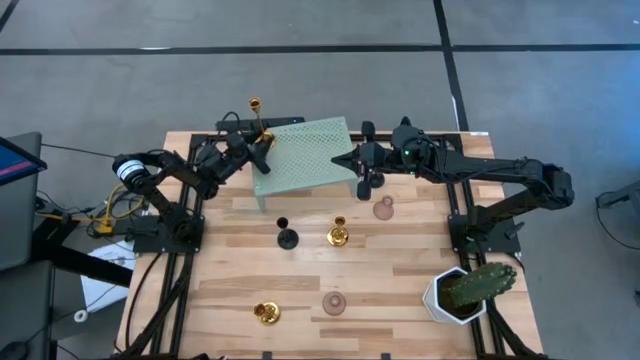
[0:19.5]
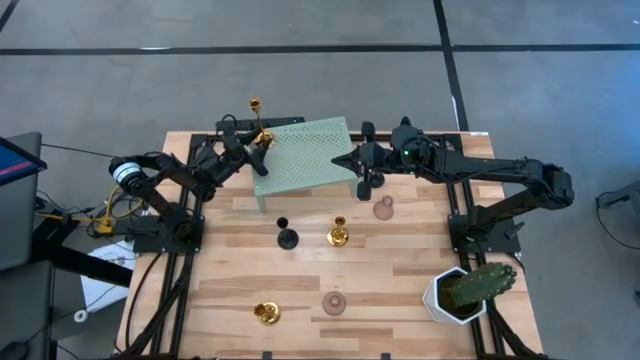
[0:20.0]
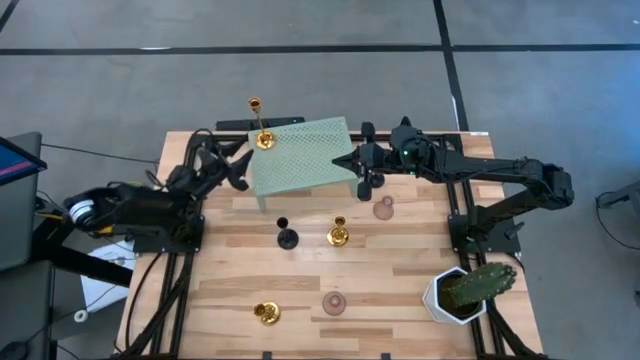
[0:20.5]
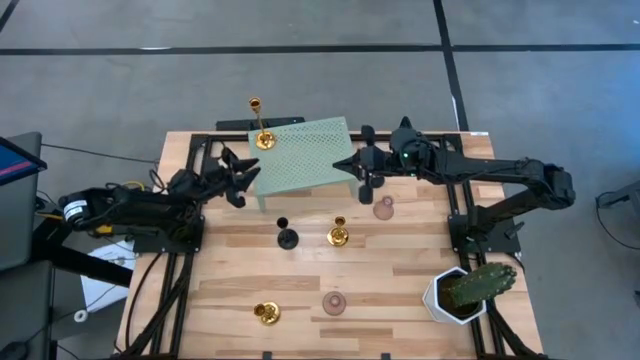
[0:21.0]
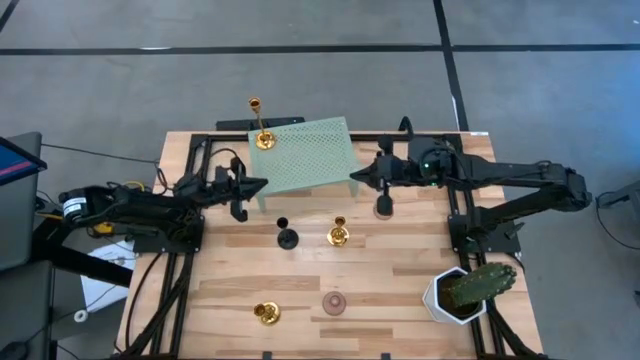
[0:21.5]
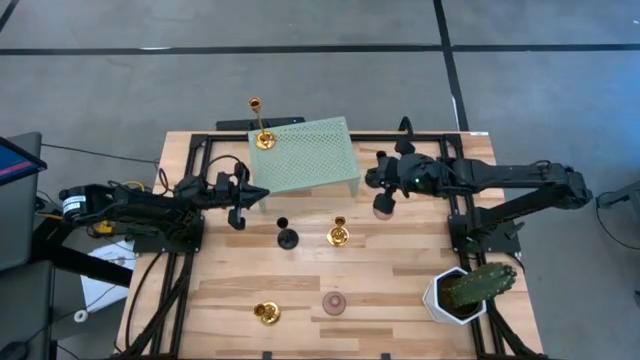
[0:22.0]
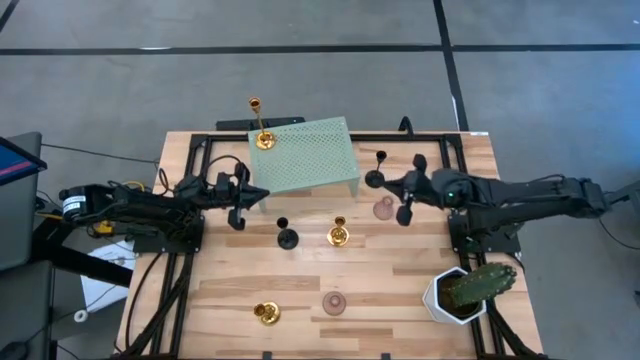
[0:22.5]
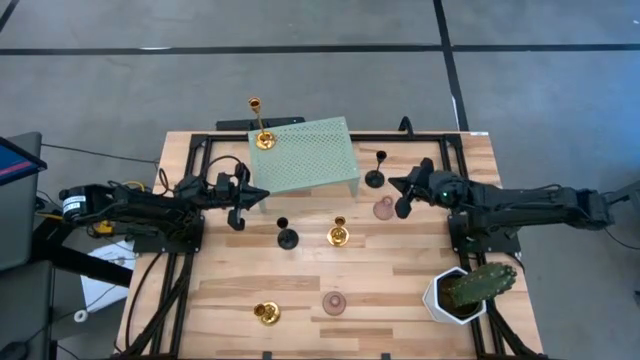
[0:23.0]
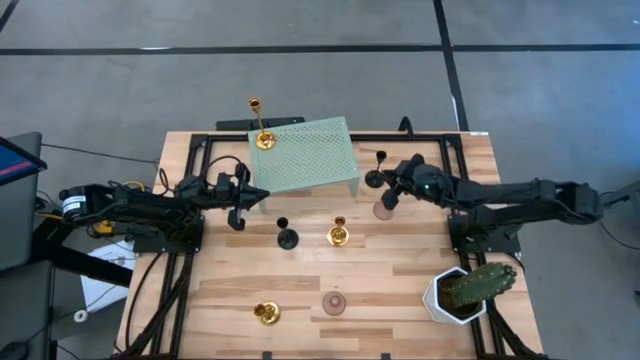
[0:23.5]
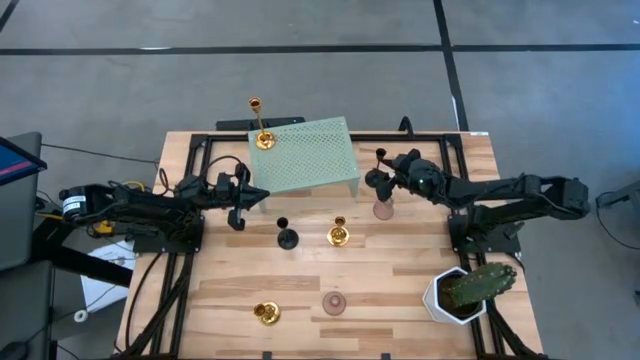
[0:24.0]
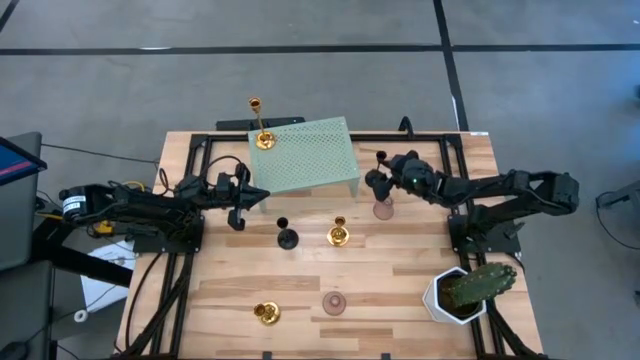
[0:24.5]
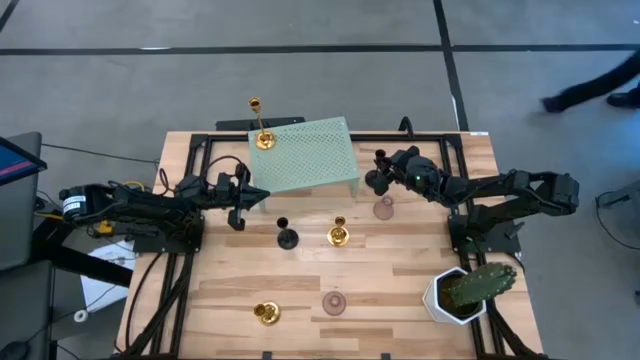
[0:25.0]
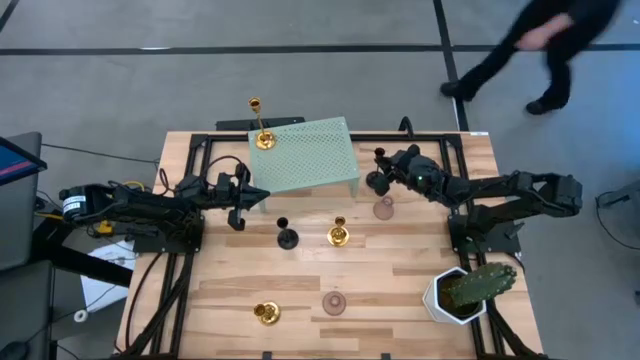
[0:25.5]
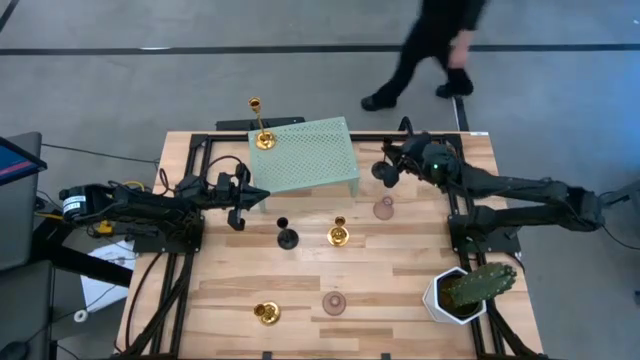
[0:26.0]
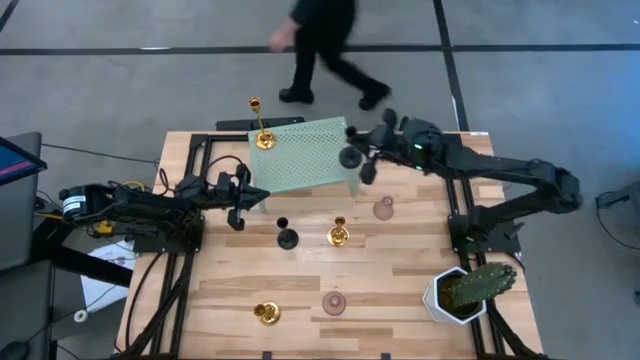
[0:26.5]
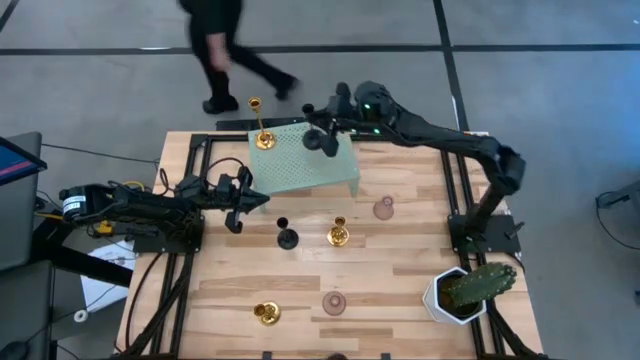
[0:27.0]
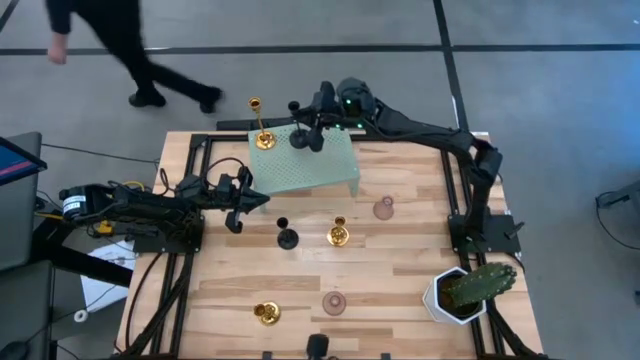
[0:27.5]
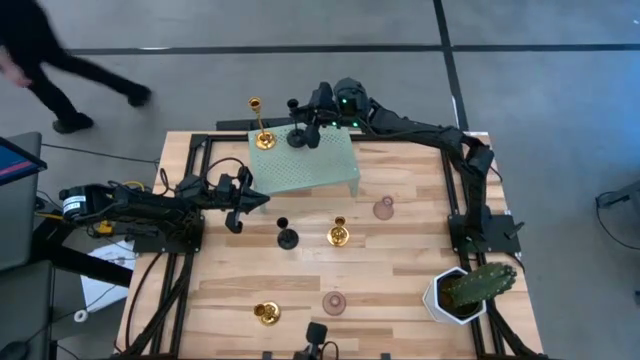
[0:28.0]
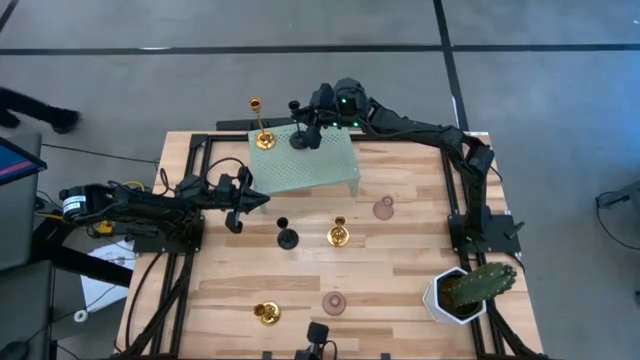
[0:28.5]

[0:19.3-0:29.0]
Task: Pick & Place candle stick holders
Put the top black candle holder on the shelf

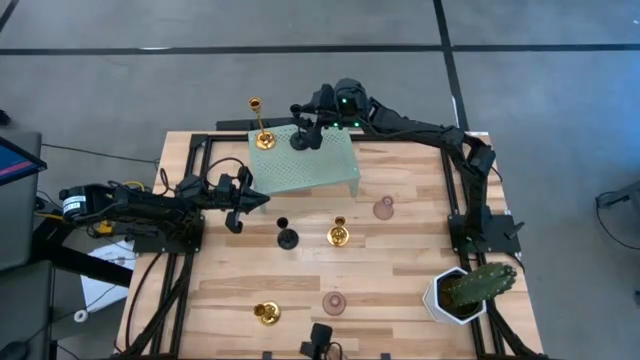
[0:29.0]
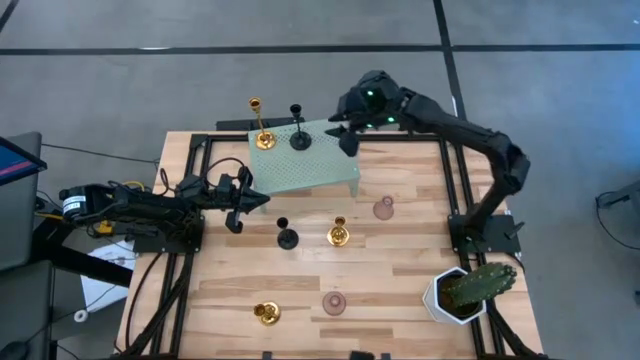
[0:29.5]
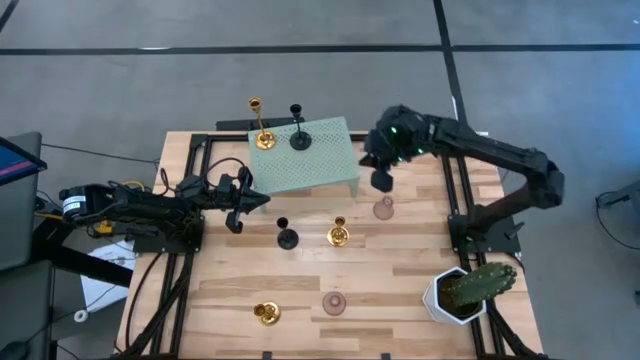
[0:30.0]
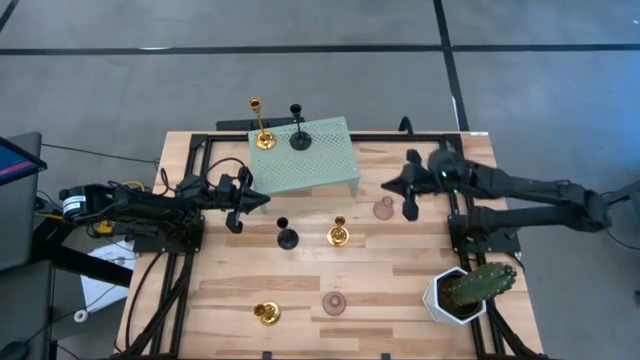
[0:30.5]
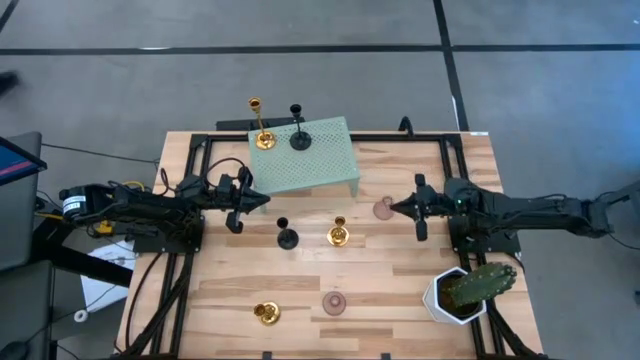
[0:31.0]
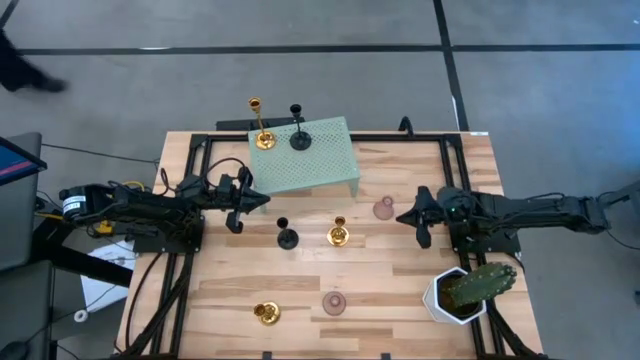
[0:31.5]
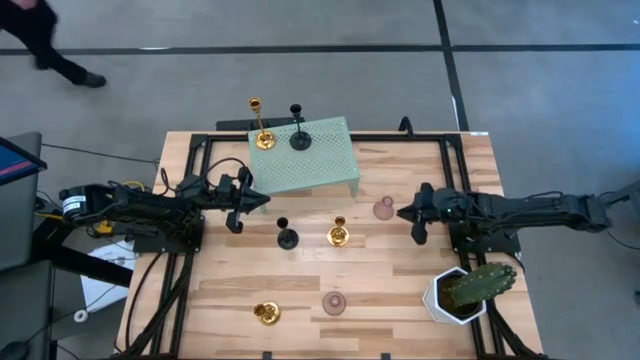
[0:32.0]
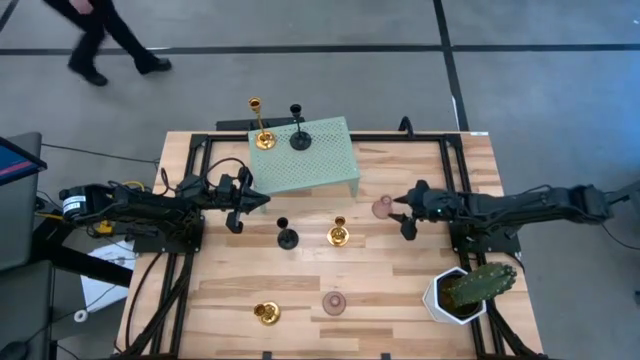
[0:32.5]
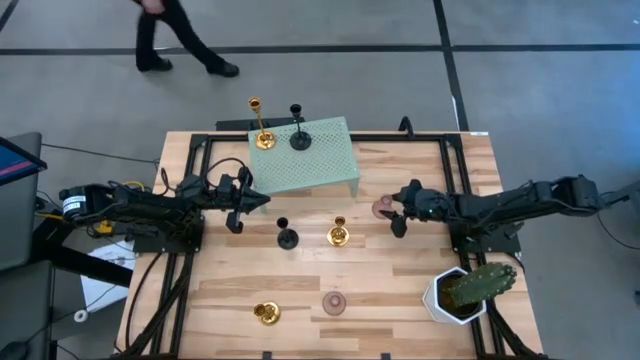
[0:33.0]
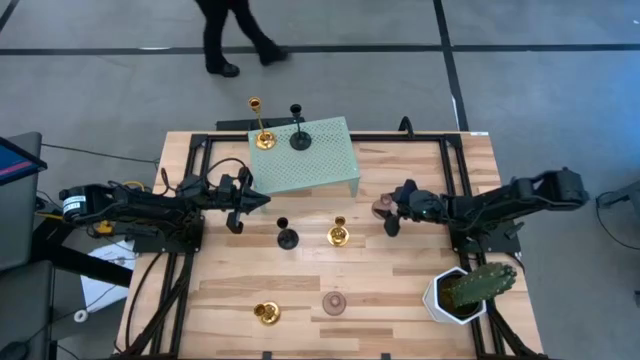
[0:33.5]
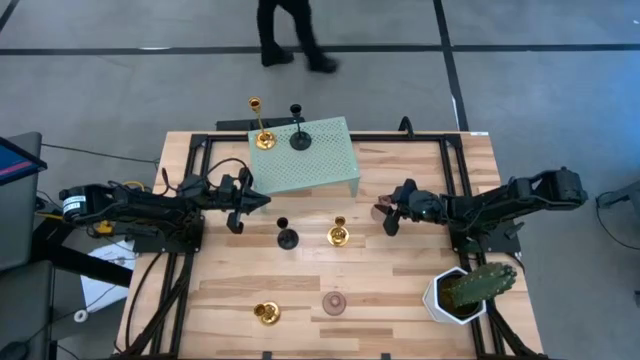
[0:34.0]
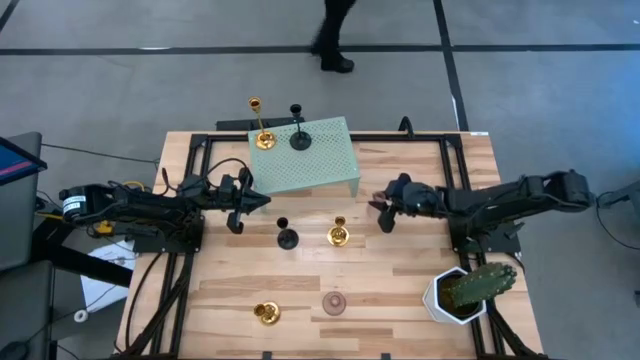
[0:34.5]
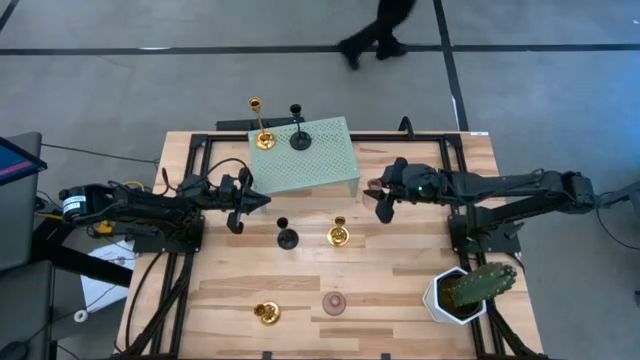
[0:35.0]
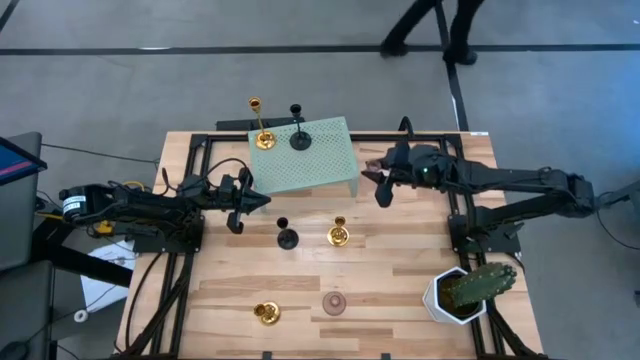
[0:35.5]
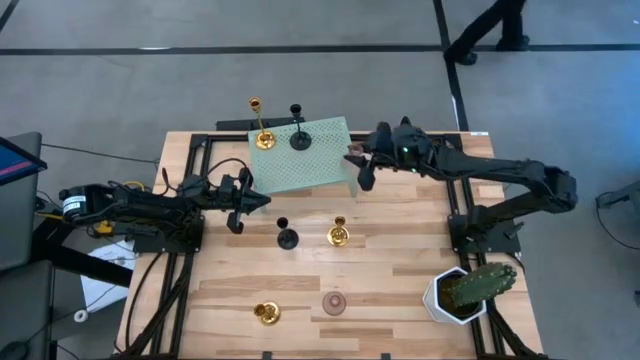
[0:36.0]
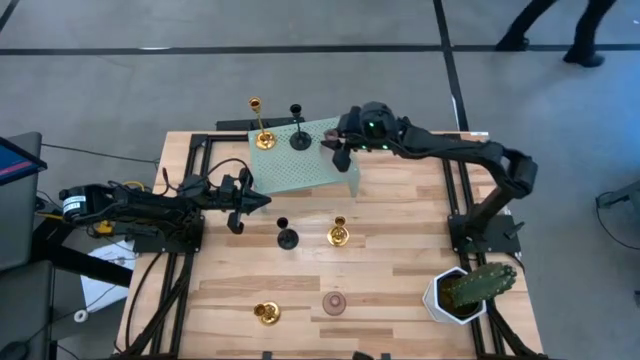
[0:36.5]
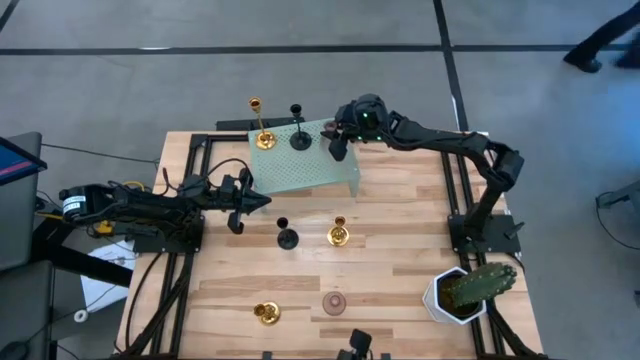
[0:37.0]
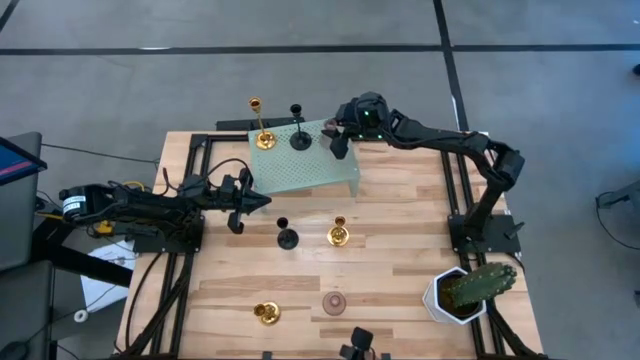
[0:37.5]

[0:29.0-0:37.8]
Put the top violet candle holder on the shelf

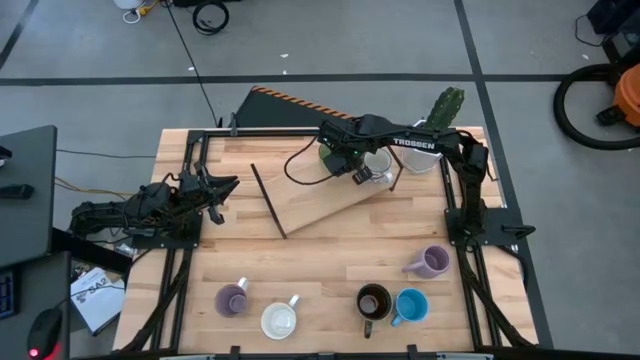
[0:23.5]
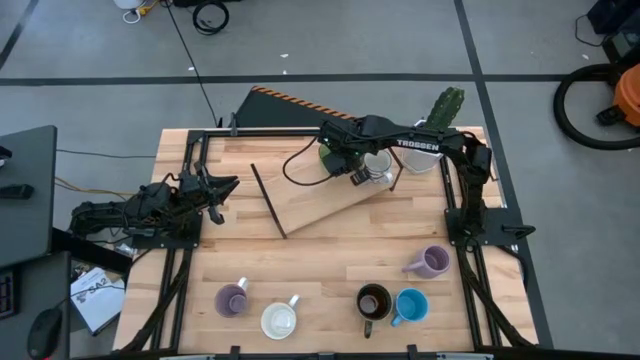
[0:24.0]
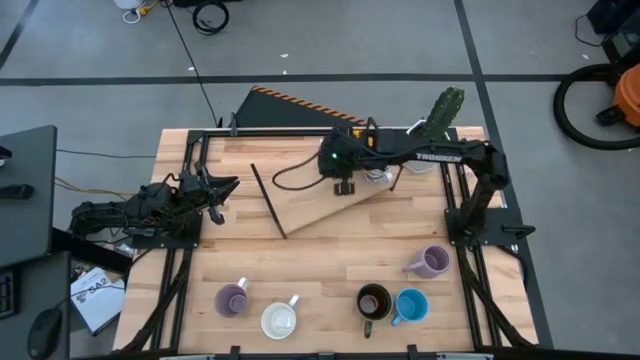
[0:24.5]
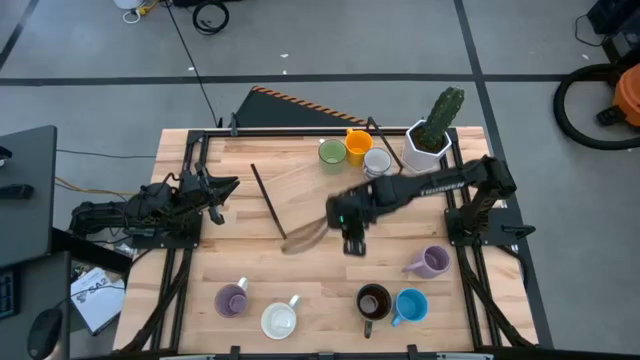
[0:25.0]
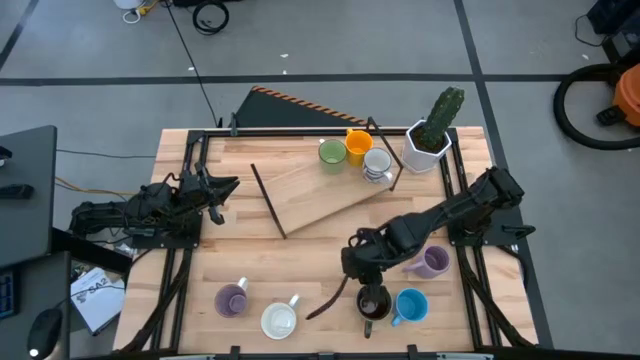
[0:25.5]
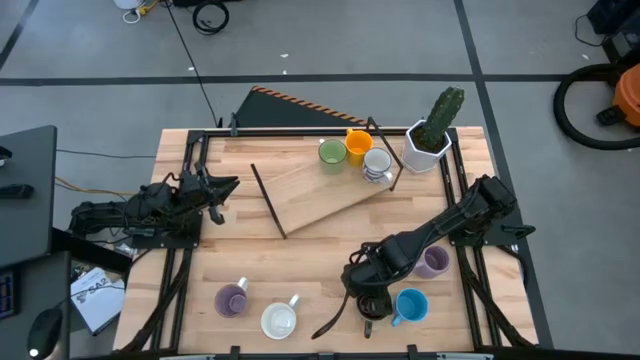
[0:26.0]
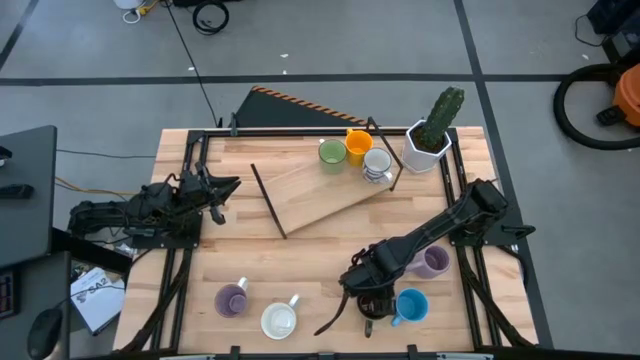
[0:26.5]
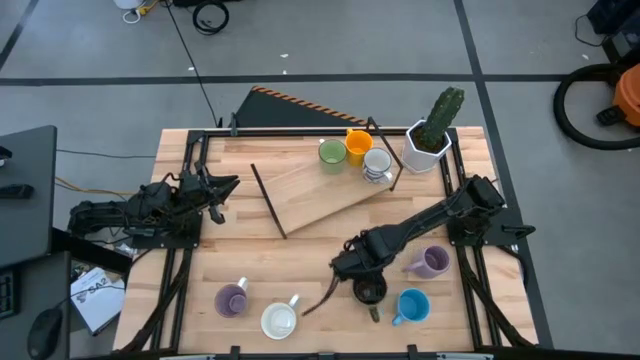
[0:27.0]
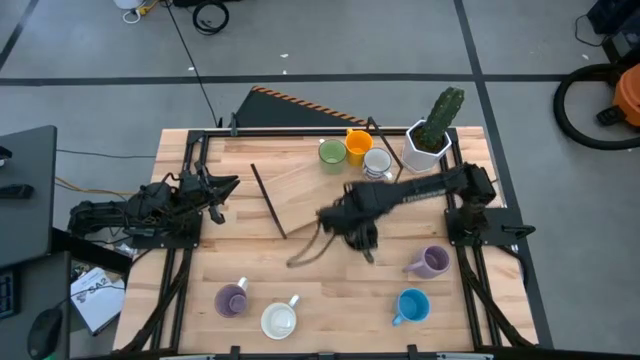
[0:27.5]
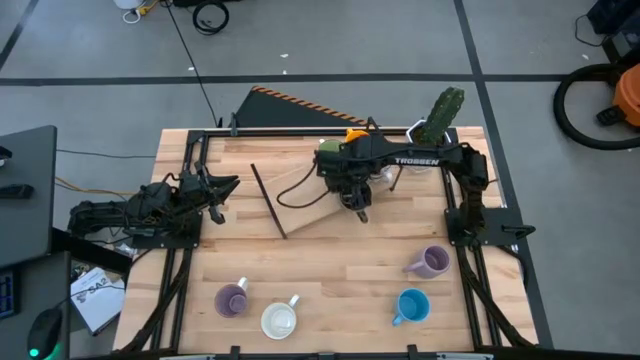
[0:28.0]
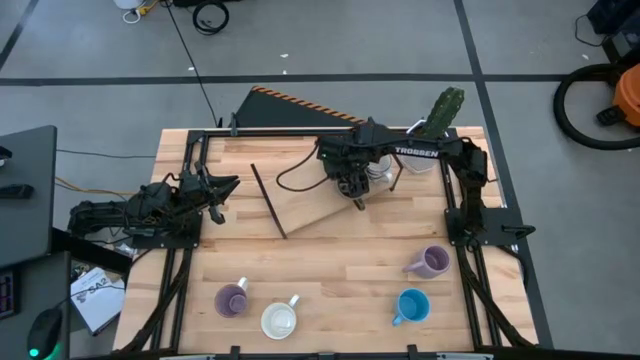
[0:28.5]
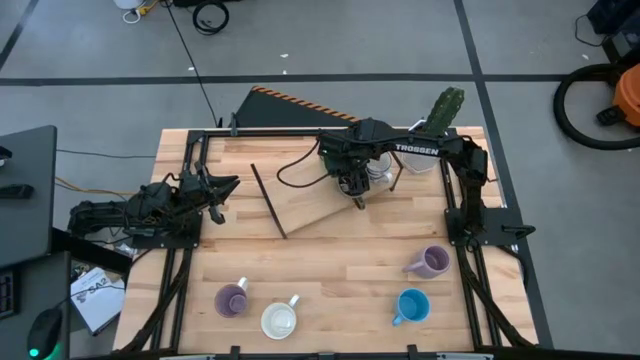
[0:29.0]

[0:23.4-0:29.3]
Task: Place coffee mugs
Put the dark blue patterned mug on the shelf
